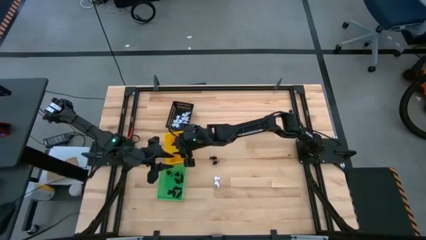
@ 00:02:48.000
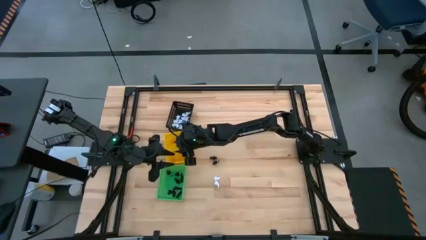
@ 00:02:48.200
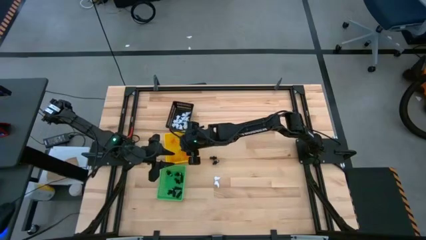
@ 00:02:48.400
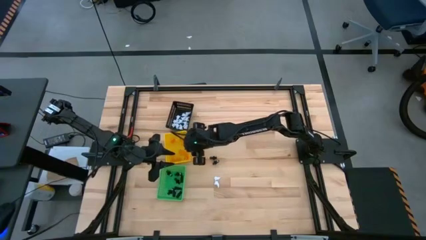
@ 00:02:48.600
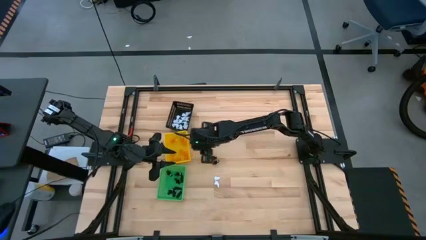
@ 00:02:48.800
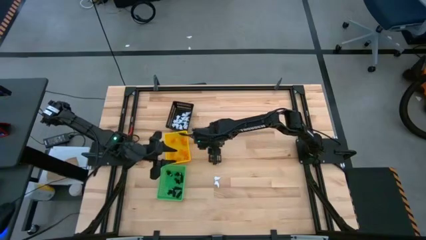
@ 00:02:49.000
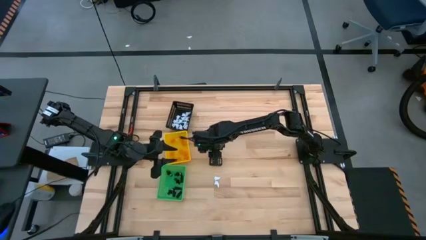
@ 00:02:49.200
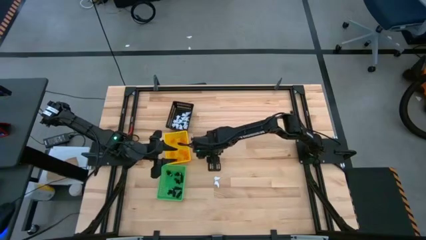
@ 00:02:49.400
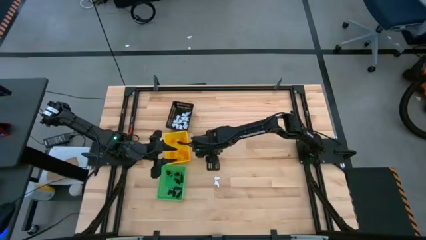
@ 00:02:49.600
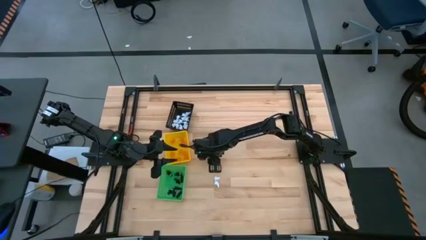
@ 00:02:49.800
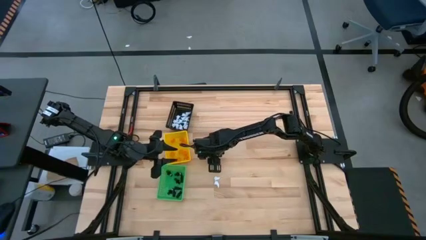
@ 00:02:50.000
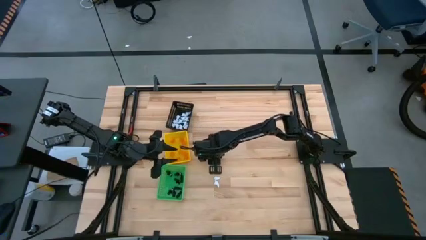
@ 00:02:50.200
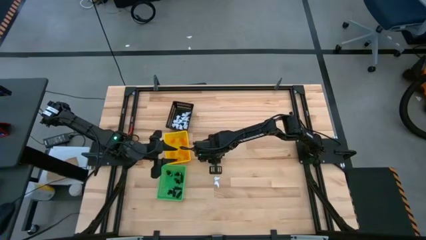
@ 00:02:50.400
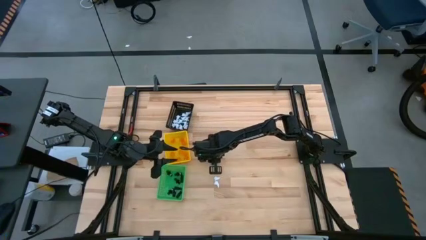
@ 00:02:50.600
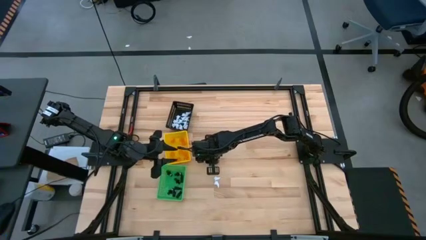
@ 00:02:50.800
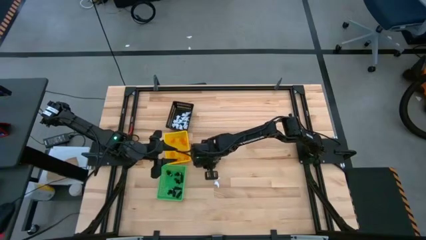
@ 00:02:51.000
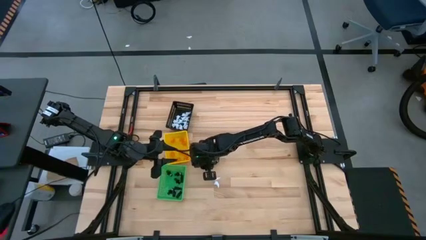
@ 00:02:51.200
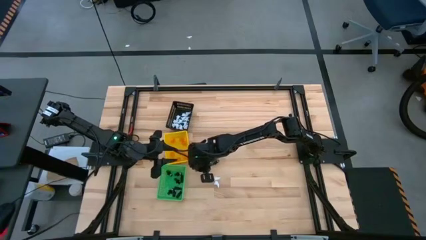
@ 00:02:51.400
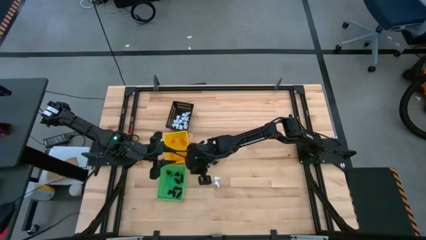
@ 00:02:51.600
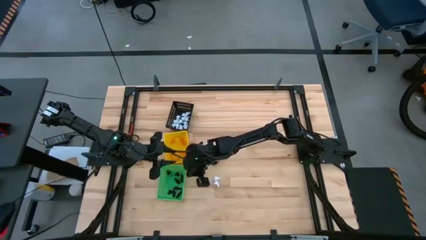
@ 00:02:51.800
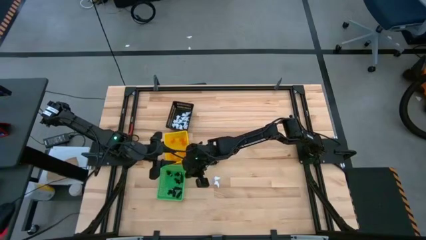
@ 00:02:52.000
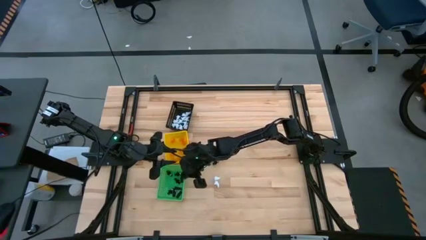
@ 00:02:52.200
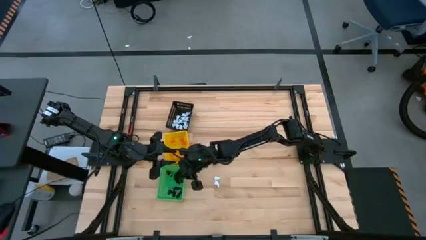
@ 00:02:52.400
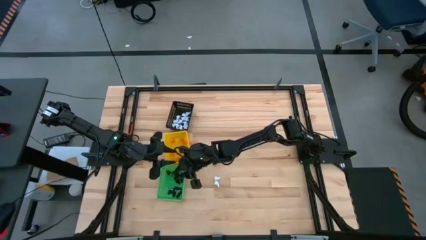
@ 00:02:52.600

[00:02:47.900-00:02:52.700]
Task: Sort Halloween decoration
Put the black skeleton toy into the green basket

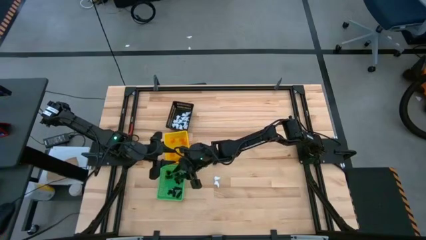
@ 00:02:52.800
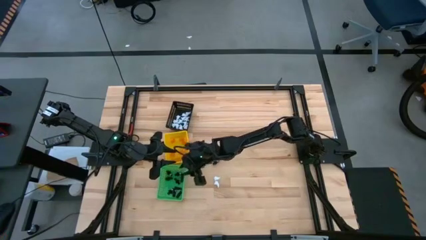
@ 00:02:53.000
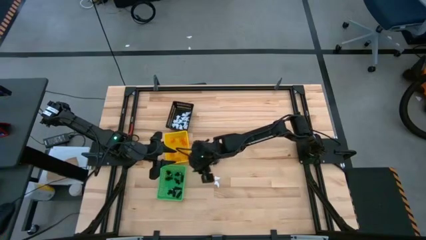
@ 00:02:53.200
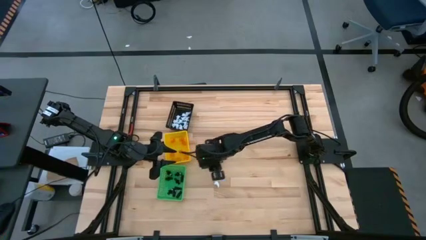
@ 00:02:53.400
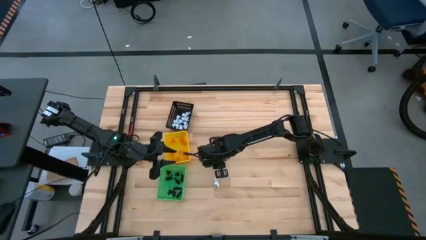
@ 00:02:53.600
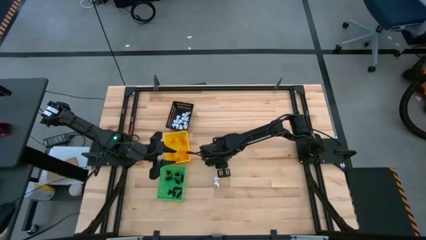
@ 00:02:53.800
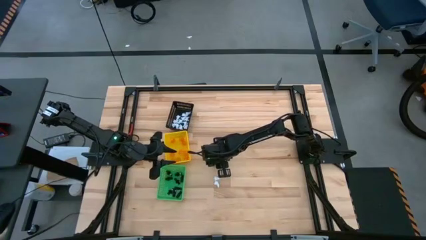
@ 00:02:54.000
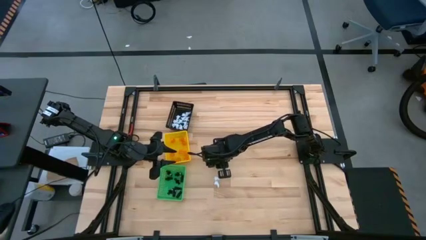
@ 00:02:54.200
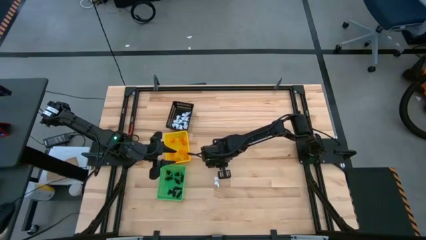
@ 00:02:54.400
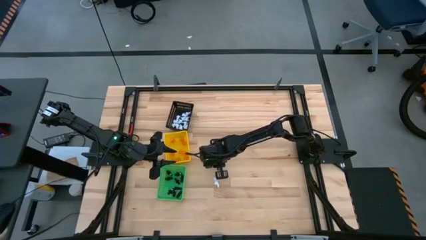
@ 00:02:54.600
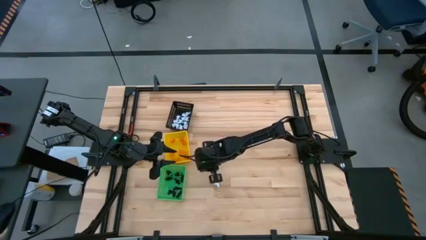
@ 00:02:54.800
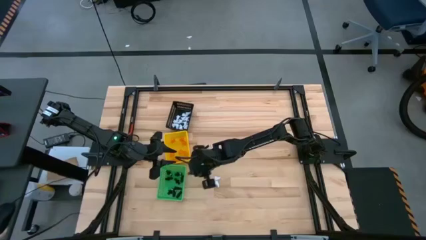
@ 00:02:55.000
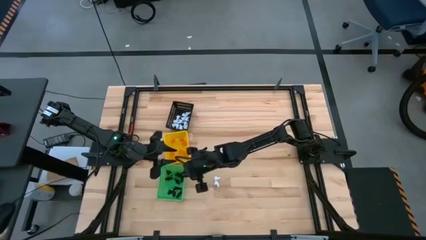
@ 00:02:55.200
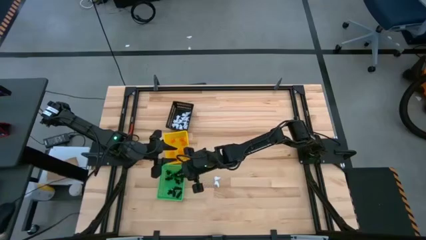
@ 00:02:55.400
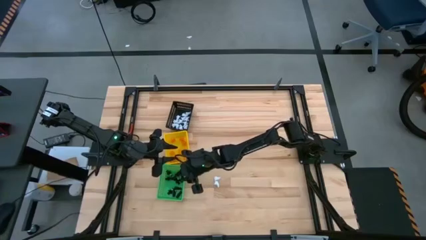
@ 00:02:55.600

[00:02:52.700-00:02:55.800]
Put the black skeleton toy into the green basket

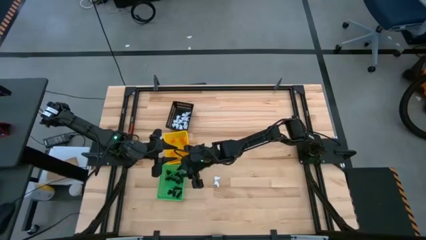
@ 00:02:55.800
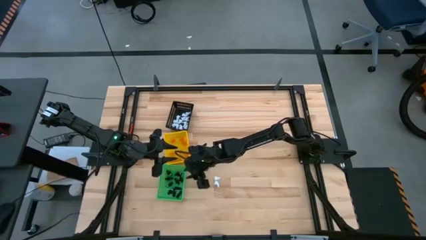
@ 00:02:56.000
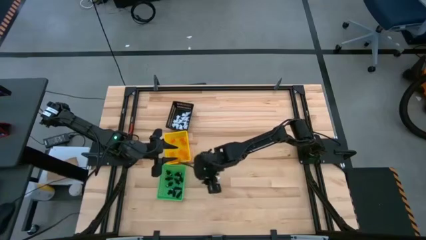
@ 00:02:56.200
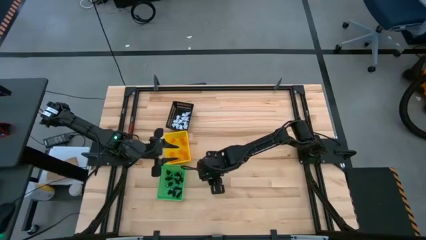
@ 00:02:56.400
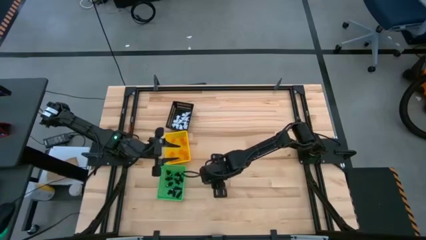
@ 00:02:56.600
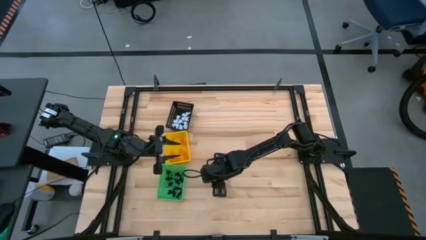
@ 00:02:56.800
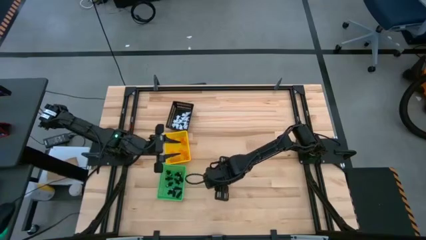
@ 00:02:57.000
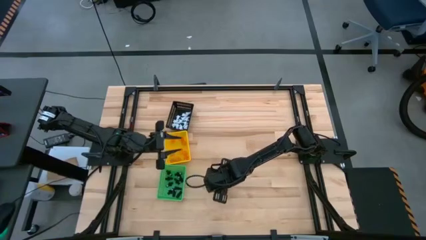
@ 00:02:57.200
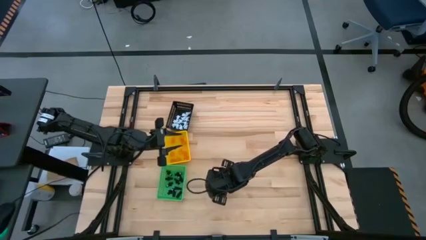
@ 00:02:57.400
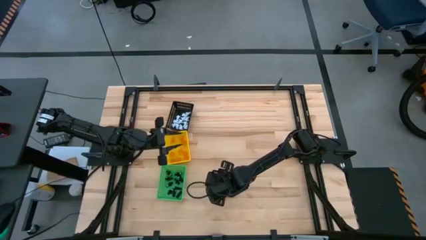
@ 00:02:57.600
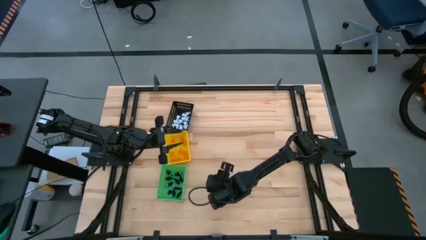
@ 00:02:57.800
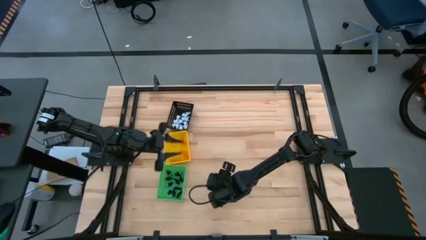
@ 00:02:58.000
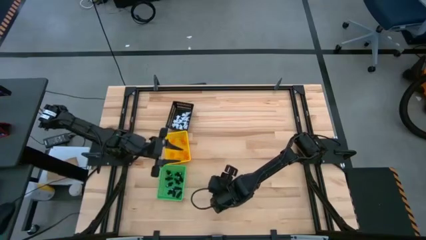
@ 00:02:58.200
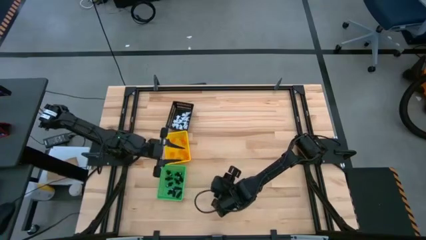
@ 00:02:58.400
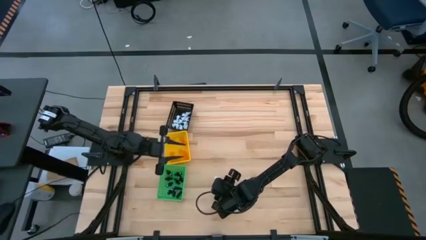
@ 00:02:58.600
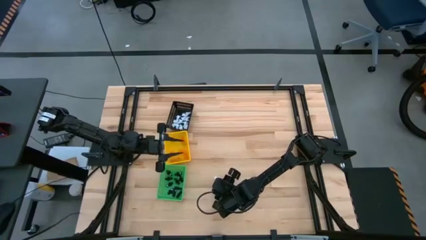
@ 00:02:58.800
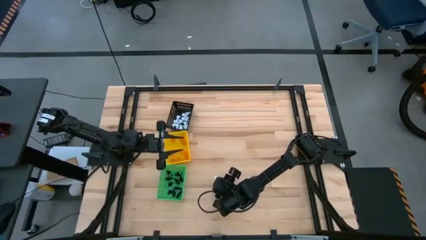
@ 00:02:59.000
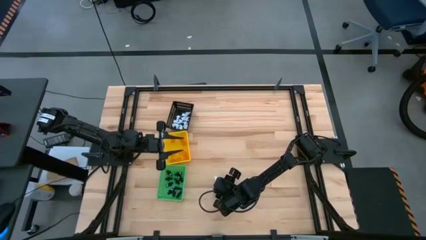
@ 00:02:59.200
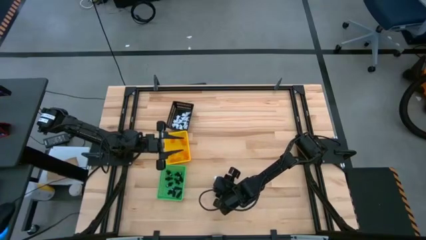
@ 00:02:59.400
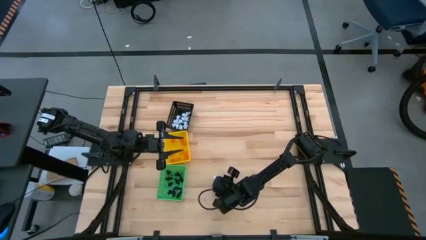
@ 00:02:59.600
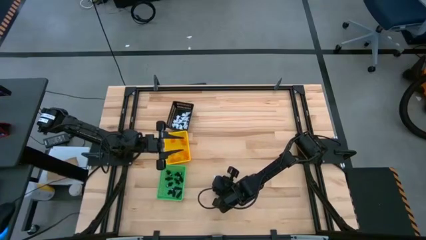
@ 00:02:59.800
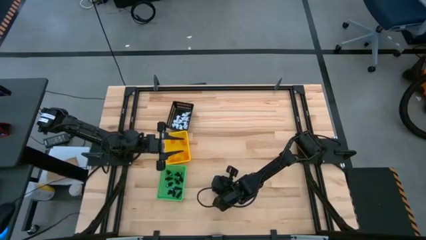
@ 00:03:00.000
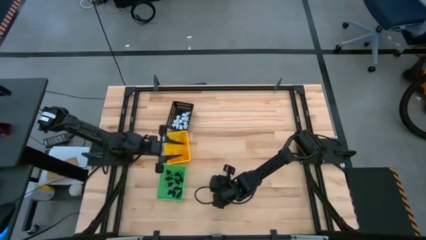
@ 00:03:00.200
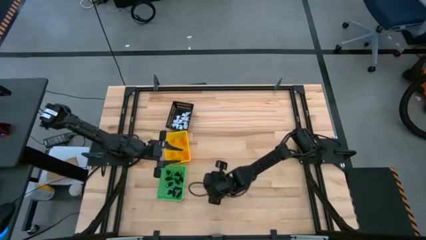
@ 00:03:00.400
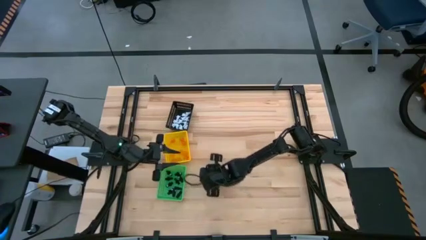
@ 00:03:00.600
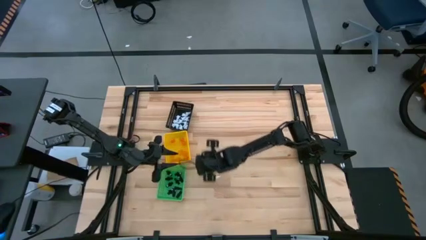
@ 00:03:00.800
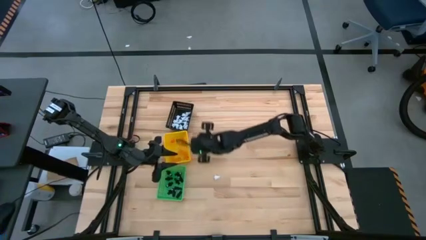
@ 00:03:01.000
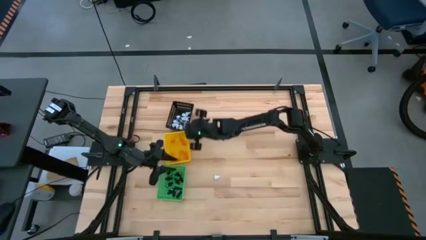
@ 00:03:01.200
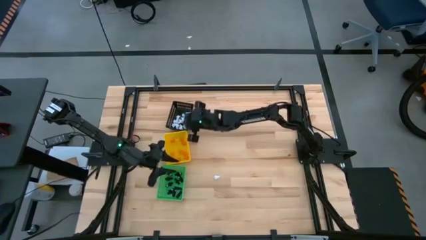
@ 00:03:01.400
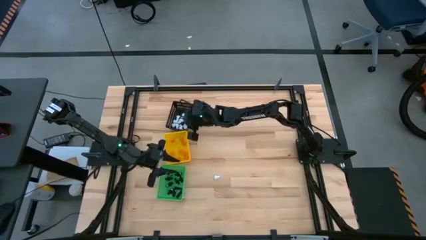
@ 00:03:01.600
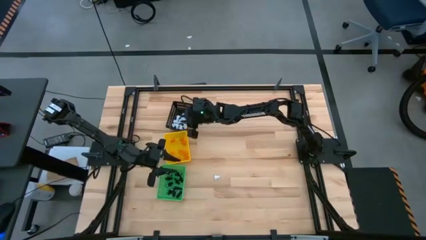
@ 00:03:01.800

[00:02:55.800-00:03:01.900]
Put the white ghost plush toy into the black basket

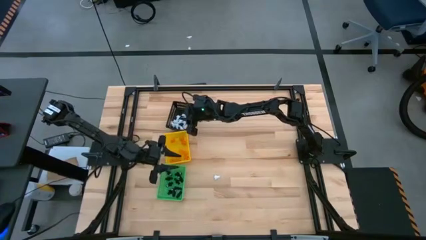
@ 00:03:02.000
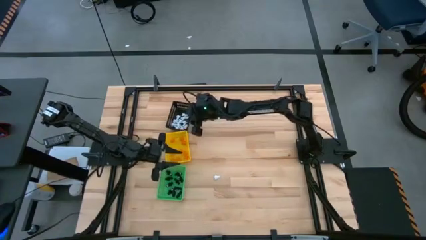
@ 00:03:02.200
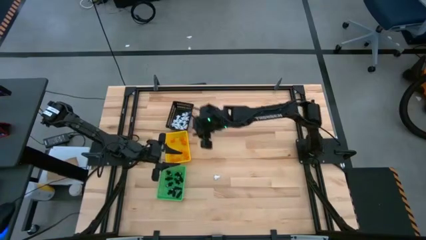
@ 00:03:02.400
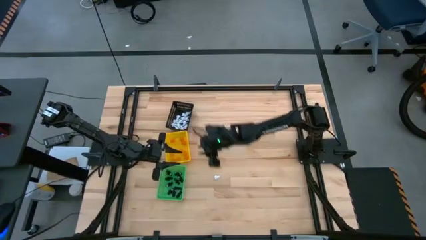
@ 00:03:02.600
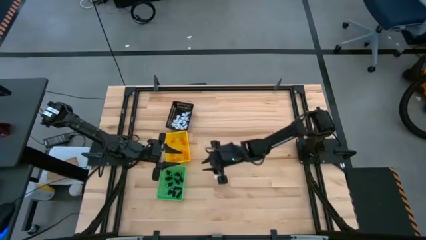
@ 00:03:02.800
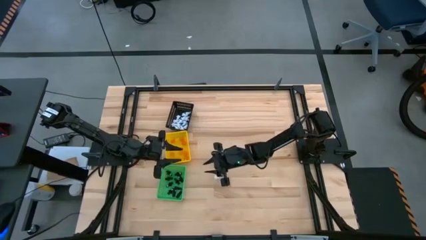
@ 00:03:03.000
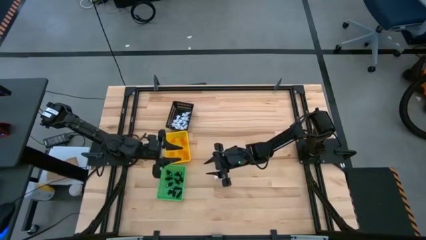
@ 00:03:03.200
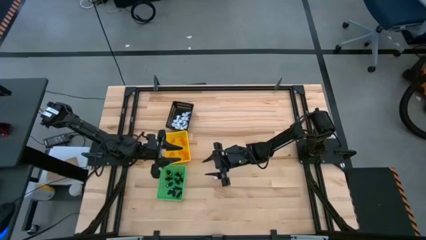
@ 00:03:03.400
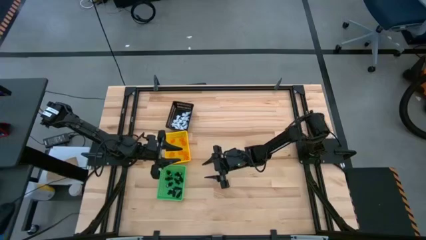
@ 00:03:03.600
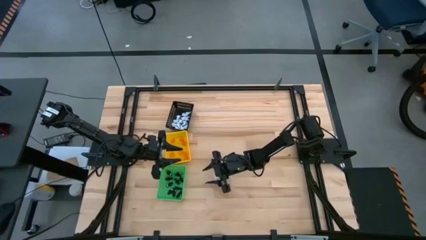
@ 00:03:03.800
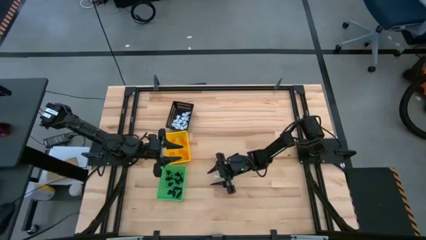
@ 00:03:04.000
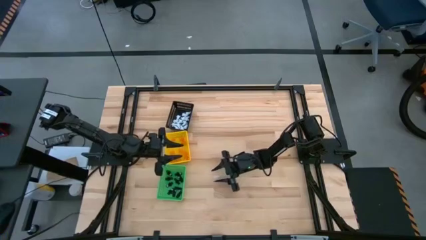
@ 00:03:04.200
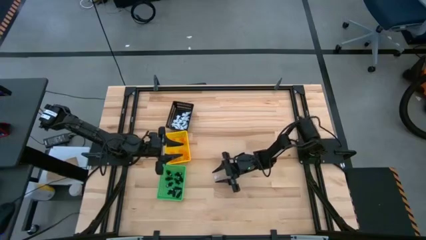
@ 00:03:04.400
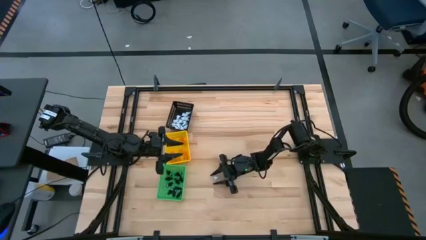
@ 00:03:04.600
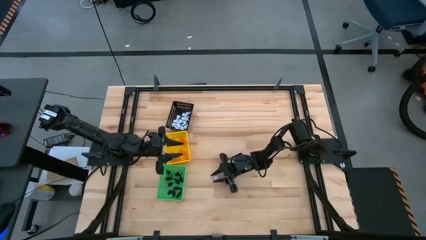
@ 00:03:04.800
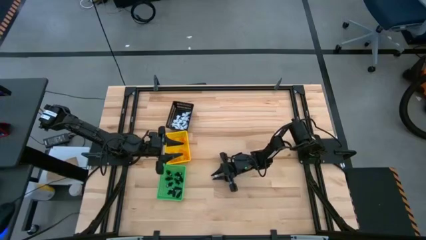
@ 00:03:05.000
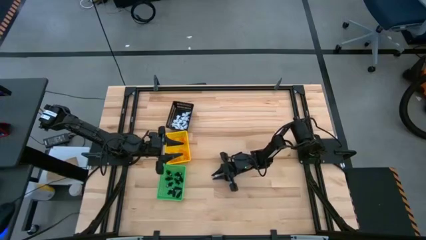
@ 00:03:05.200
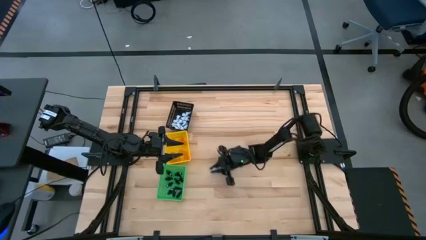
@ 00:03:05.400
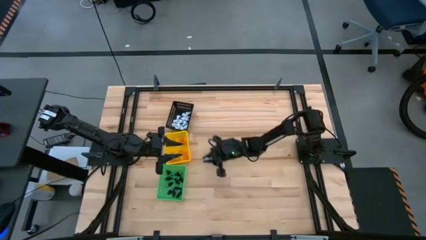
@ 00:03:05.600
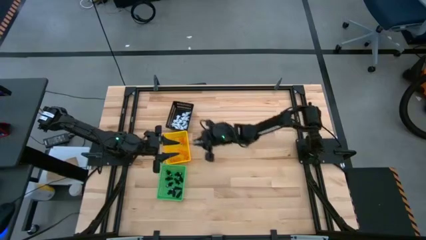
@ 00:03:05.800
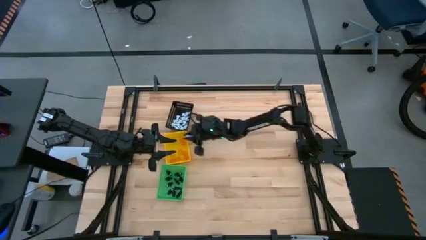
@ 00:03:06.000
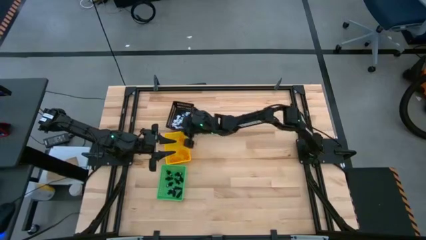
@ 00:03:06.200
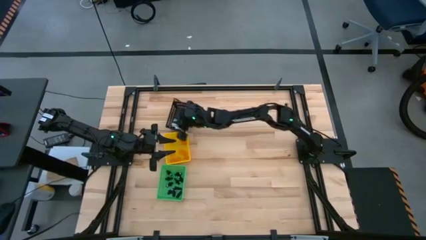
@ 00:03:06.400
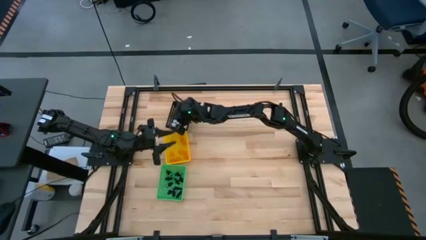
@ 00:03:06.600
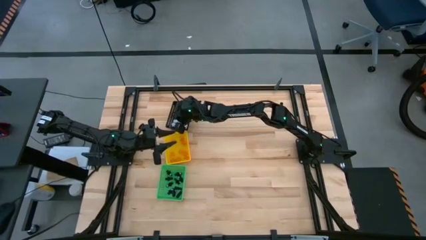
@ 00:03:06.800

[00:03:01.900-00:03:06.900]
Put the white ghost plush toy into the black basket
